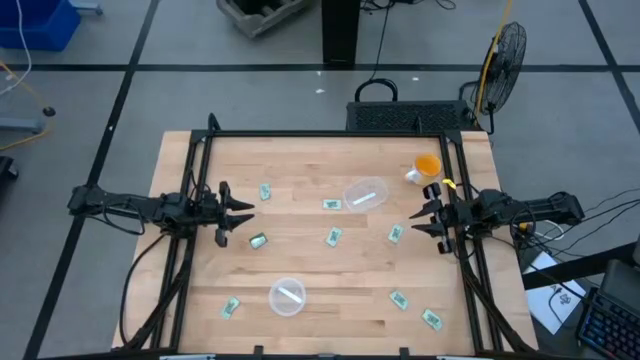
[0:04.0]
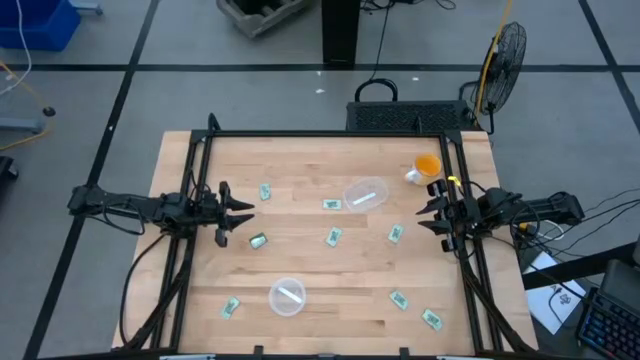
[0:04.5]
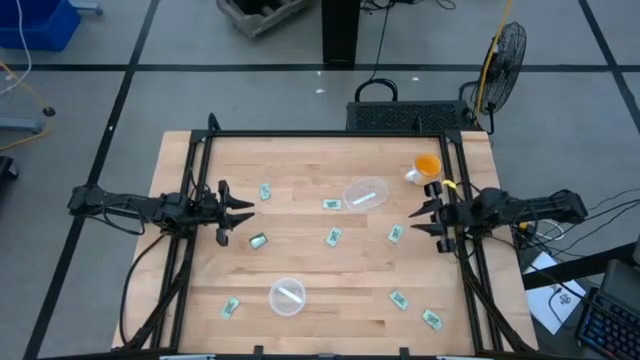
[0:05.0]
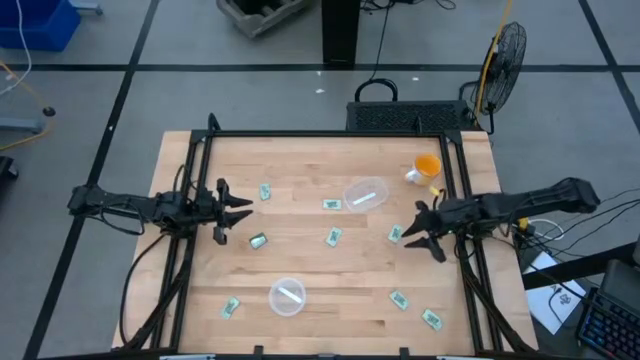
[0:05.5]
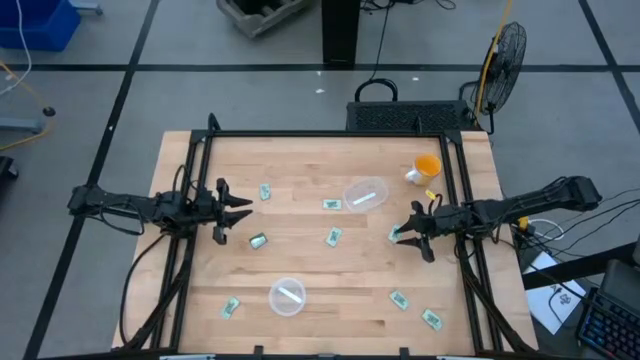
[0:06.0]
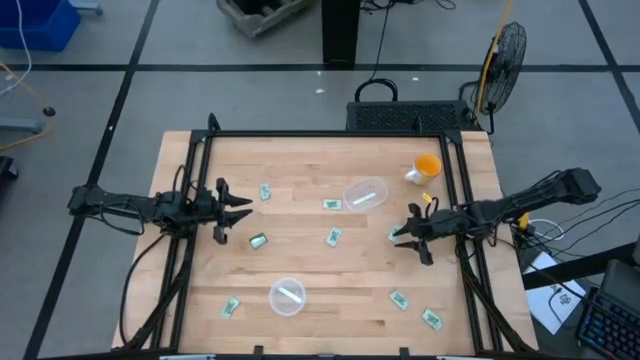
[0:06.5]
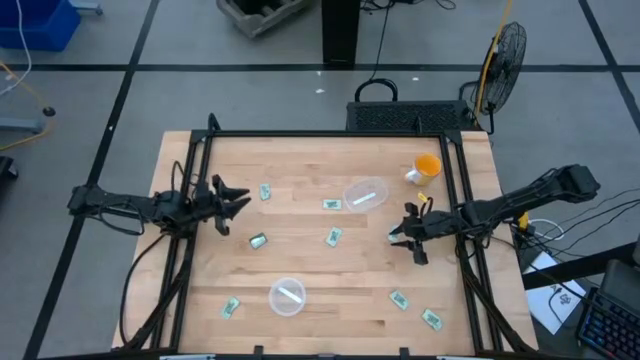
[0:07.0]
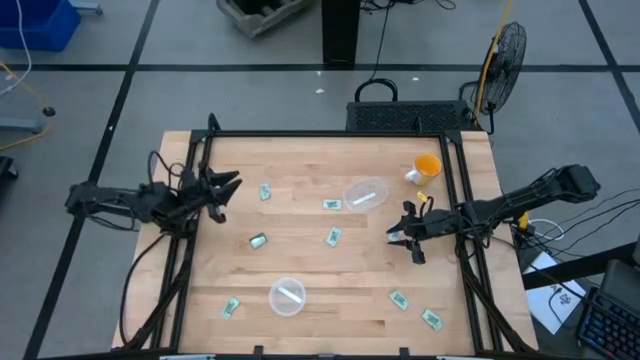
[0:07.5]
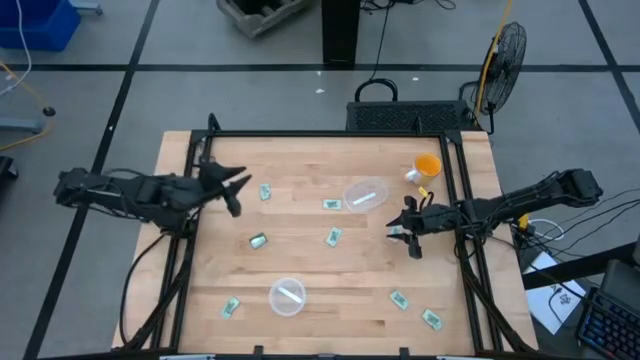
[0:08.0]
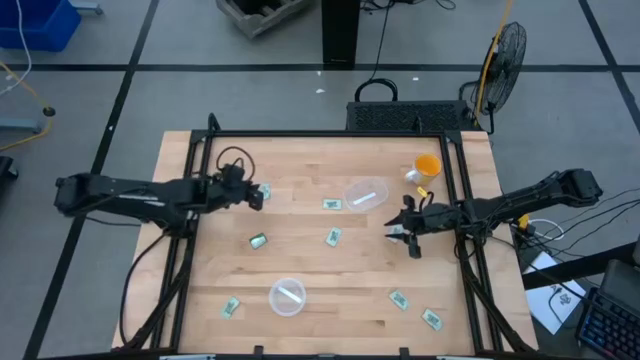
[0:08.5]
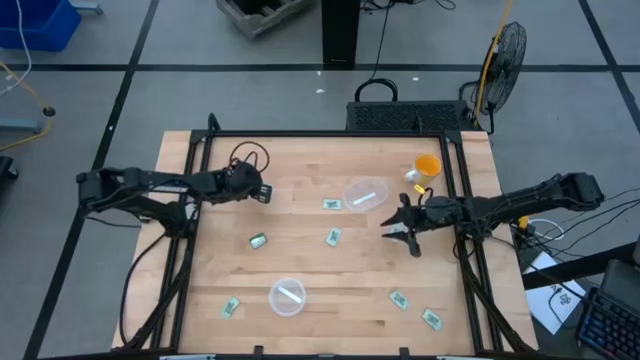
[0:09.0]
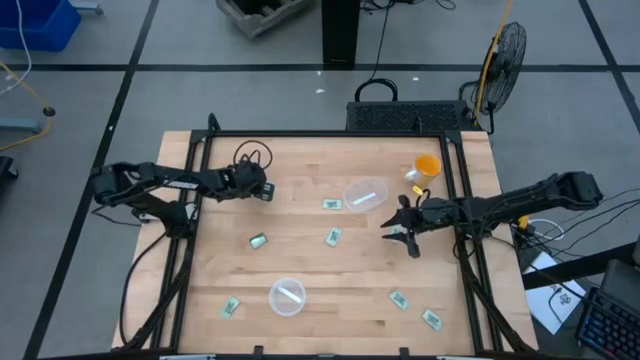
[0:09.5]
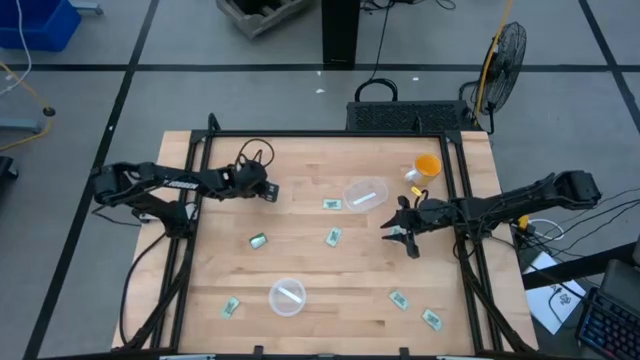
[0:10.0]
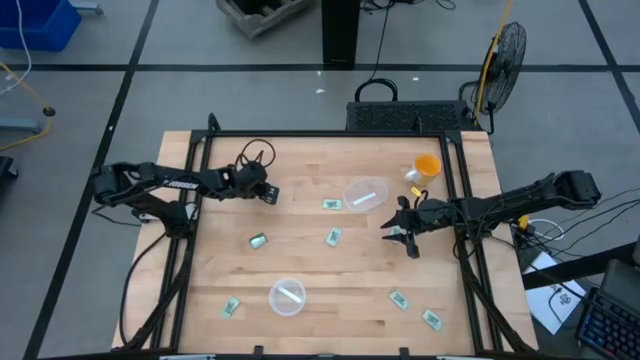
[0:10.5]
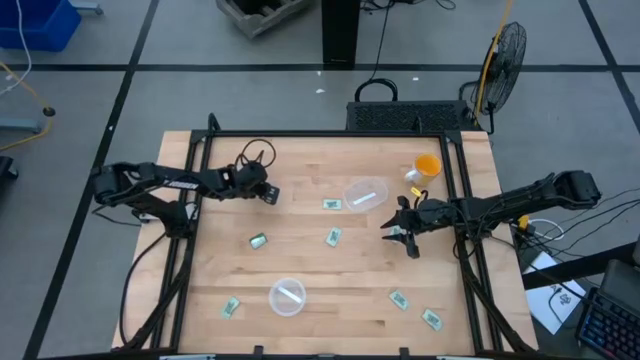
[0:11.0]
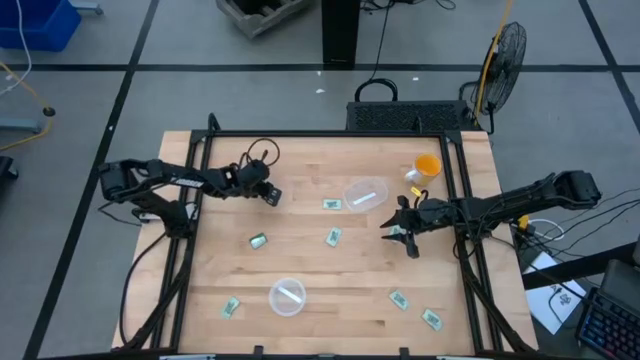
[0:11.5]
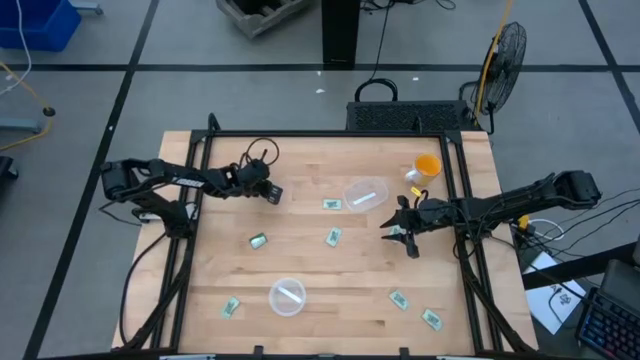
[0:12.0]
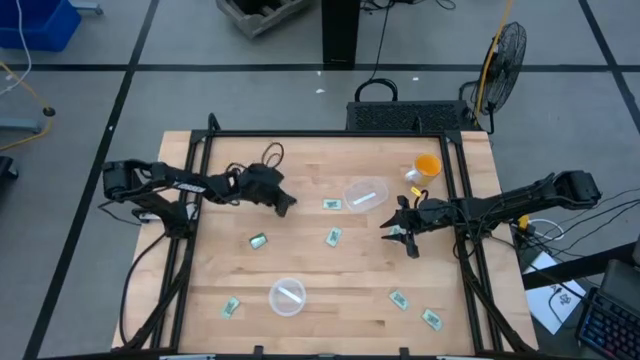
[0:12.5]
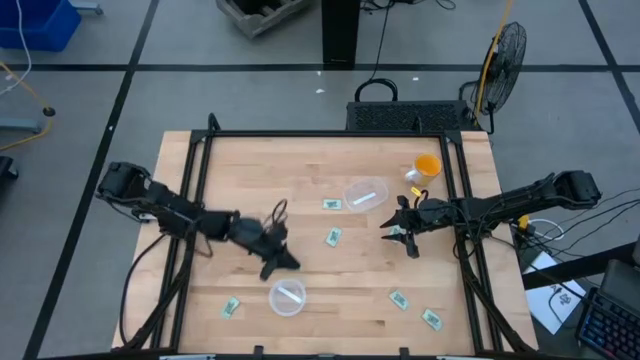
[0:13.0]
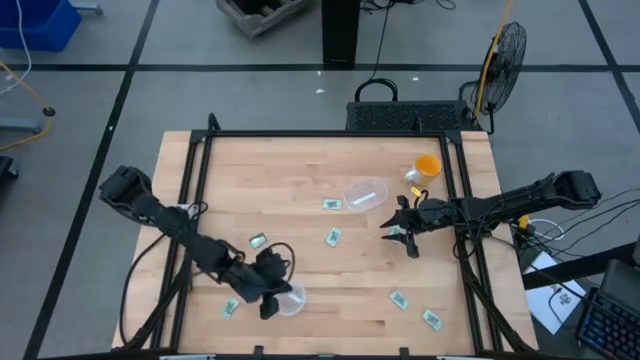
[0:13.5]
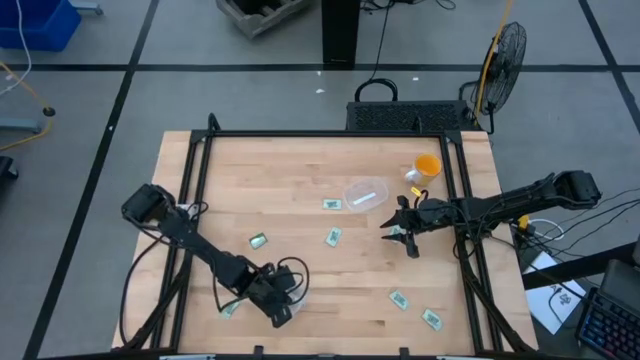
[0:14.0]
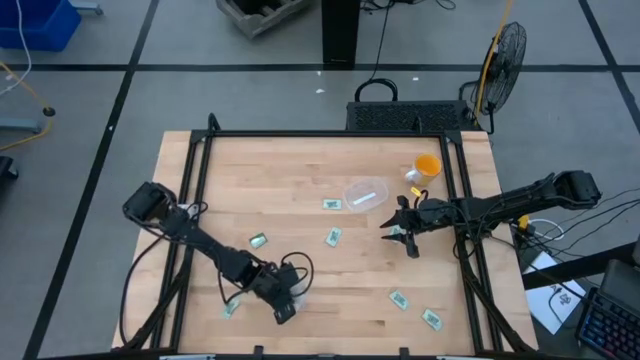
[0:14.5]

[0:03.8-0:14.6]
Task: Pick and place Stevia / Truvia into bins
Put the stevia packet into the transparent container

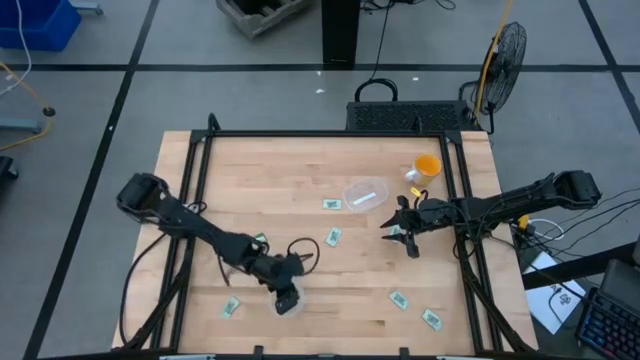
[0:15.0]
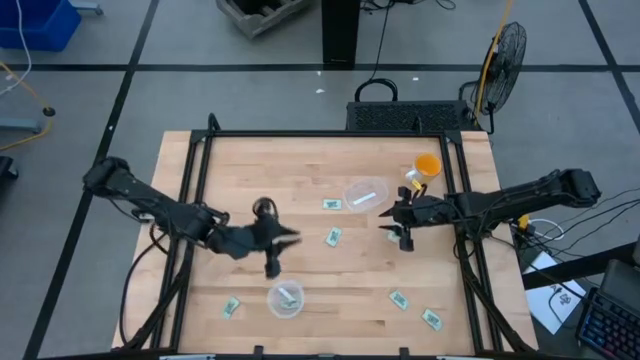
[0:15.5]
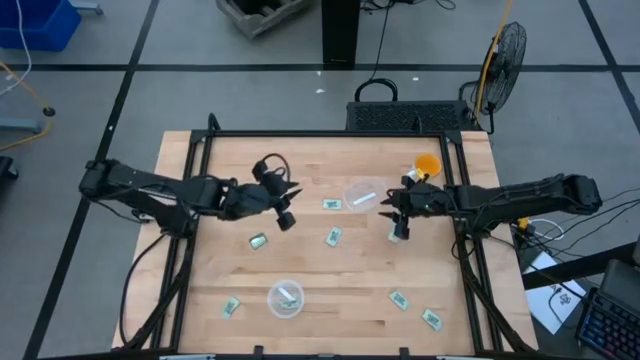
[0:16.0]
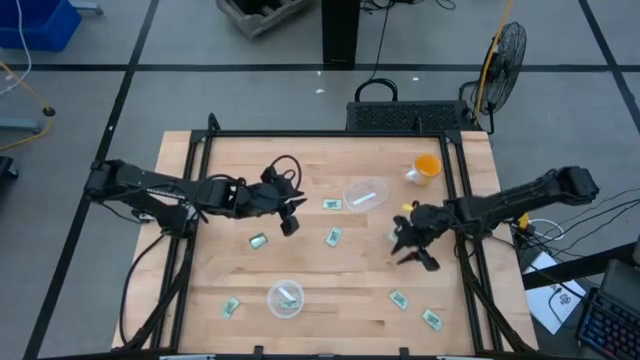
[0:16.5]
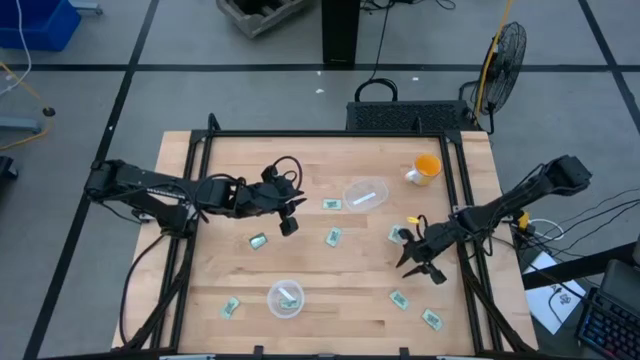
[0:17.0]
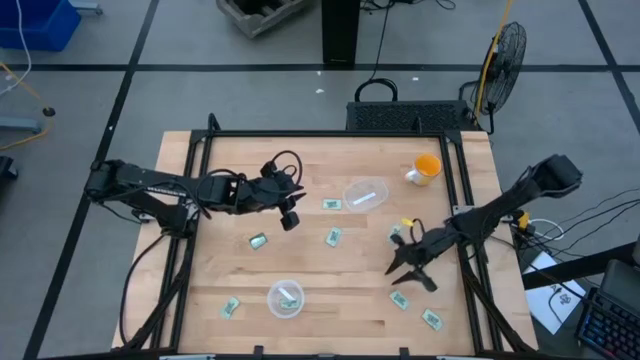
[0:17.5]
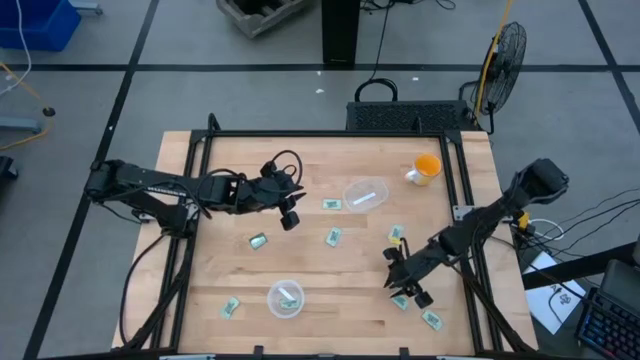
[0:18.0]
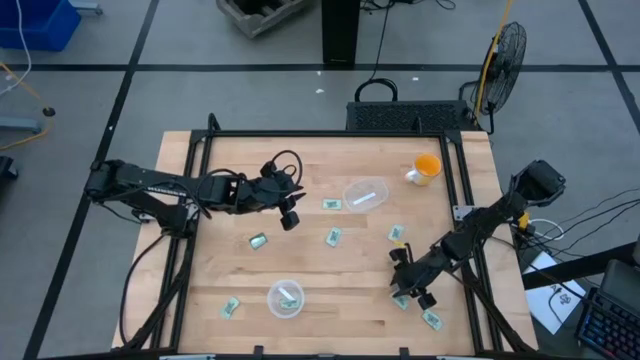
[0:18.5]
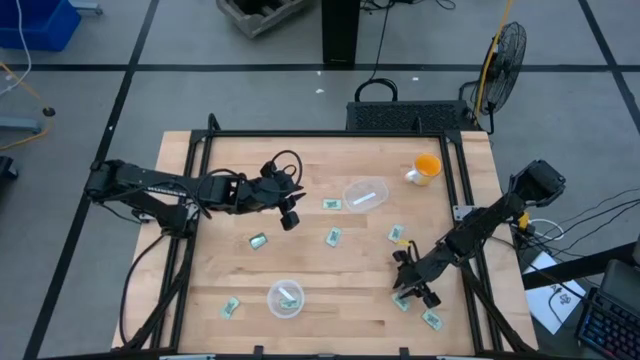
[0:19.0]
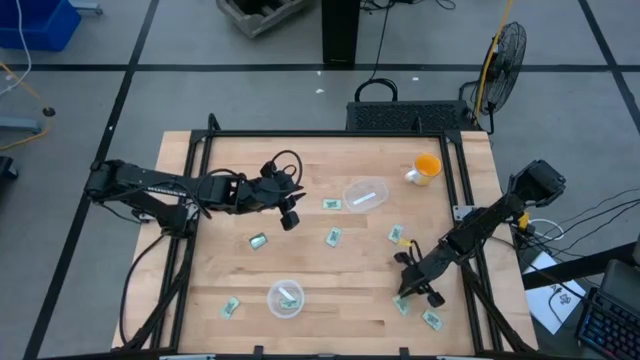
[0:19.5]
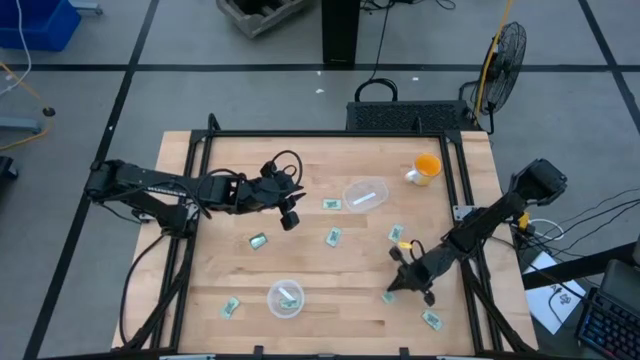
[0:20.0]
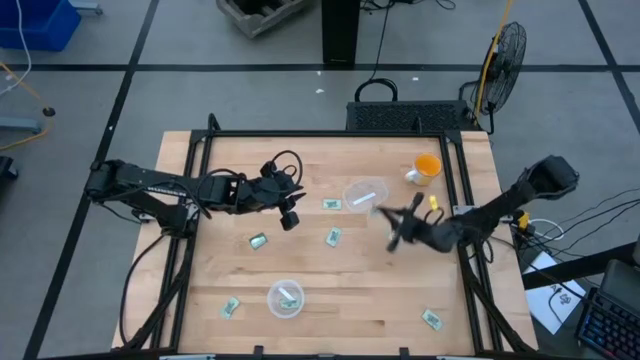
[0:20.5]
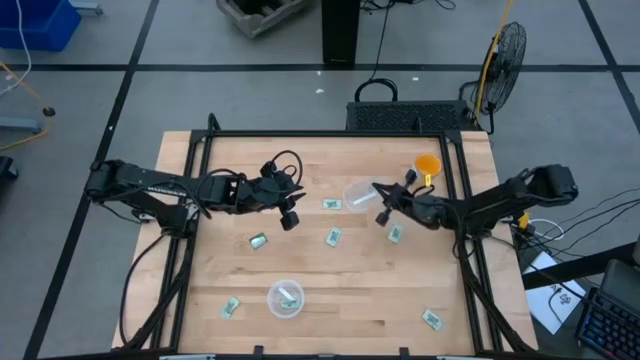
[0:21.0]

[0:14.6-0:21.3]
Put the stevia packet into the transparent container

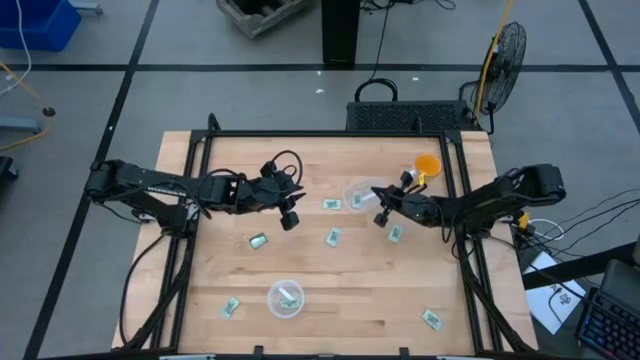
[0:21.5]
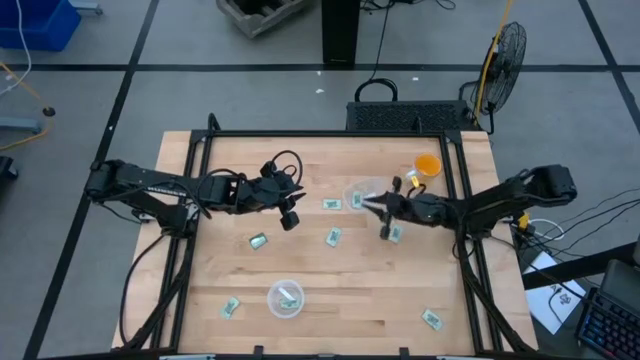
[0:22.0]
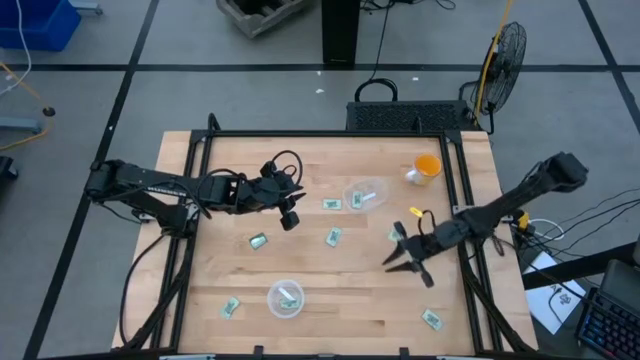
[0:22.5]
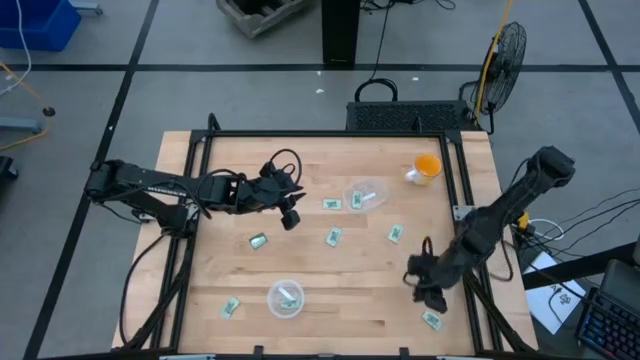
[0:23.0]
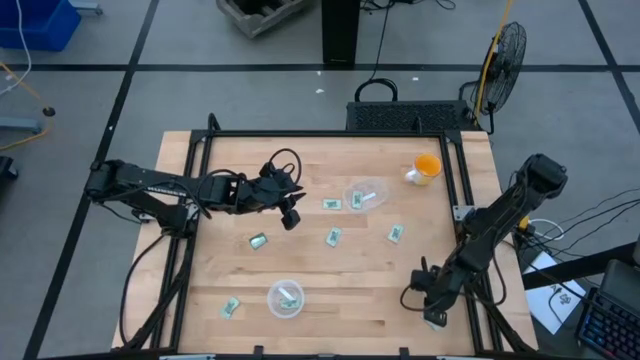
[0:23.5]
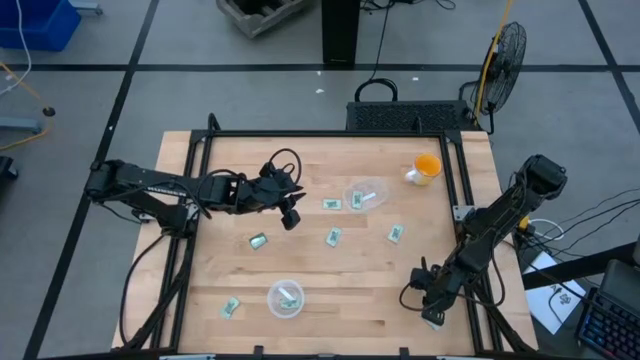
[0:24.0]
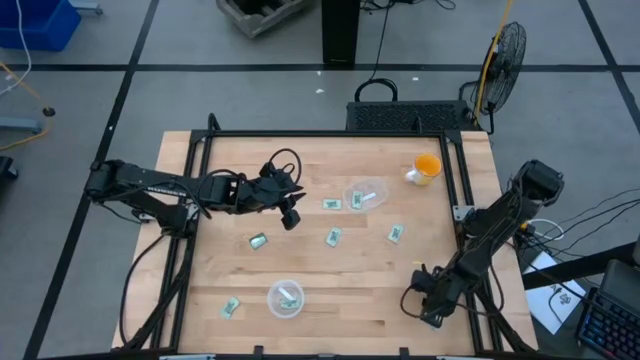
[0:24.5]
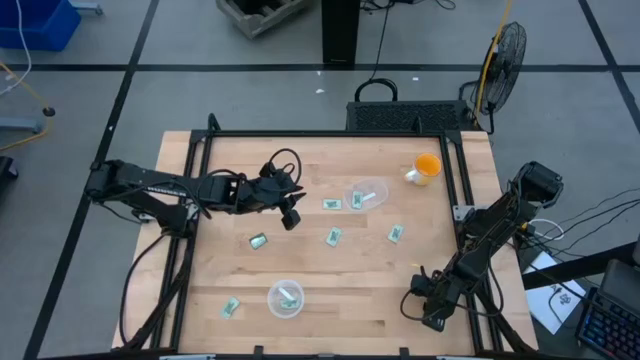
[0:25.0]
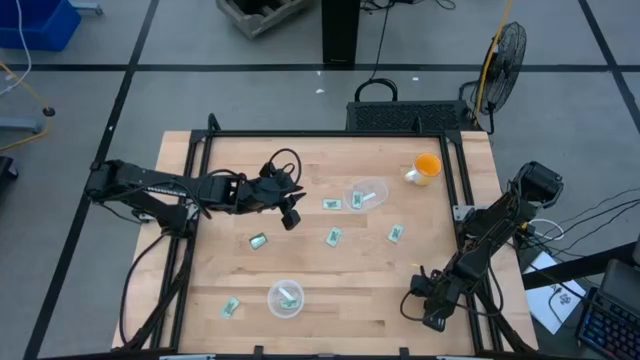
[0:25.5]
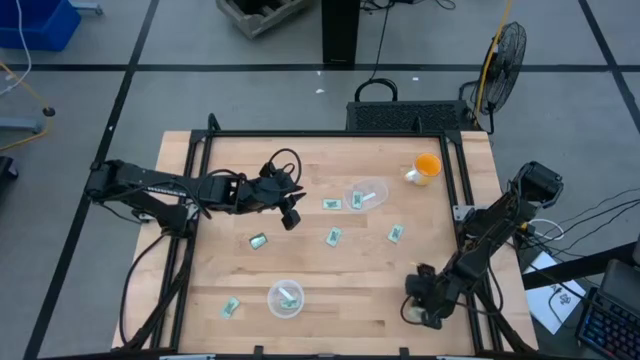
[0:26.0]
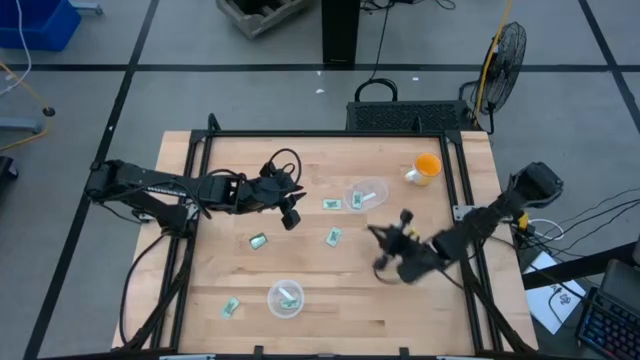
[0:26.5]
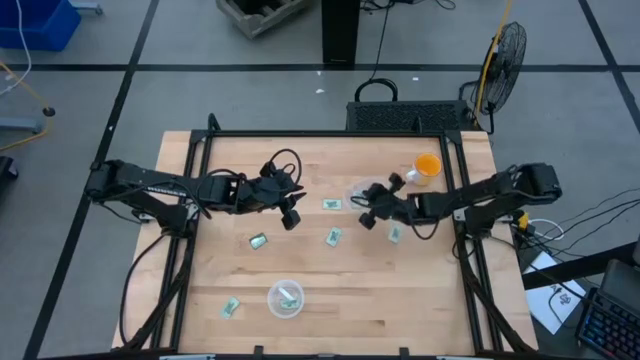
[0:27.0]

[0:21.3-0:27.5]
Put the stevia packet into the transparent container
